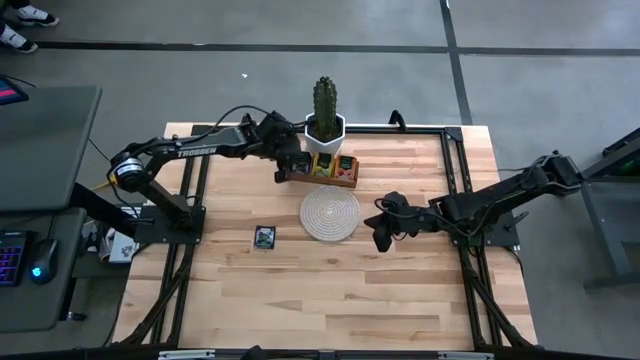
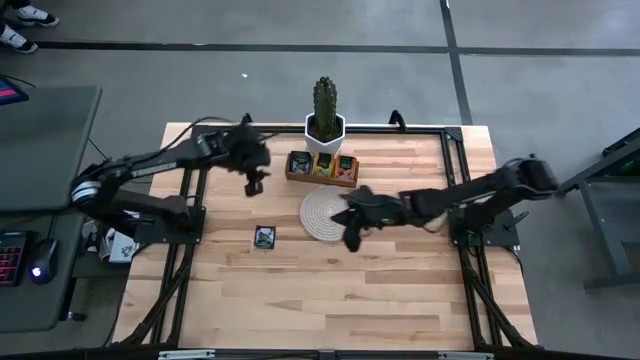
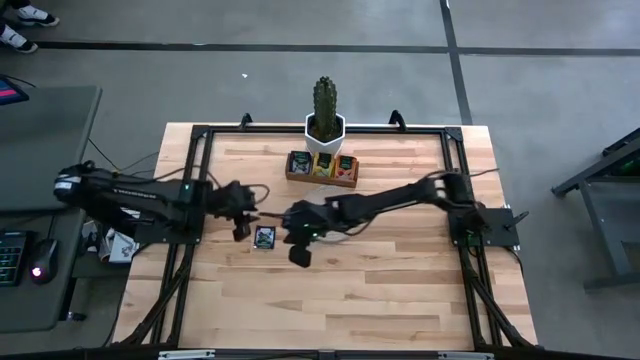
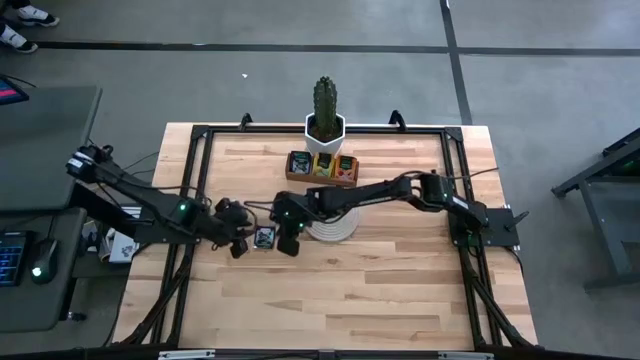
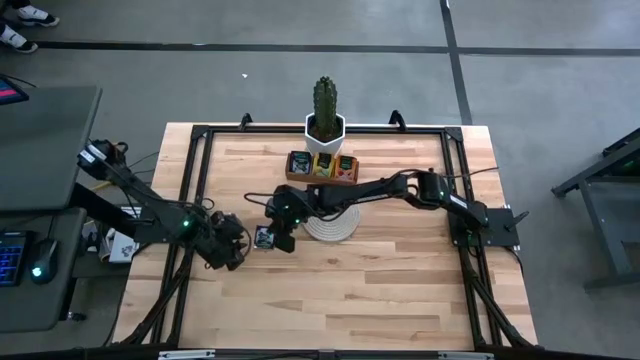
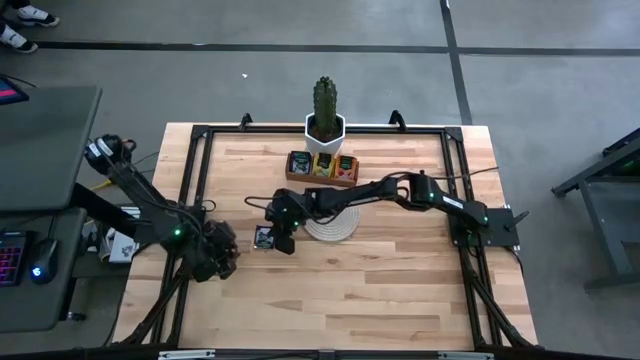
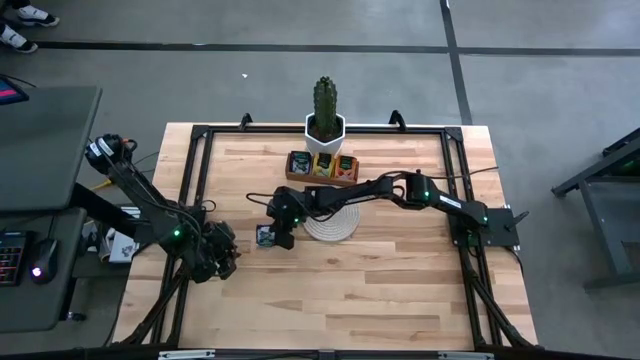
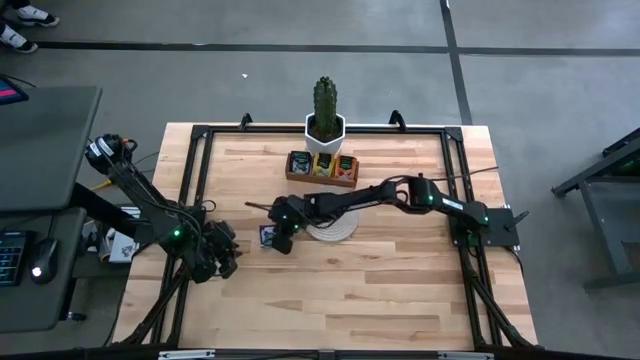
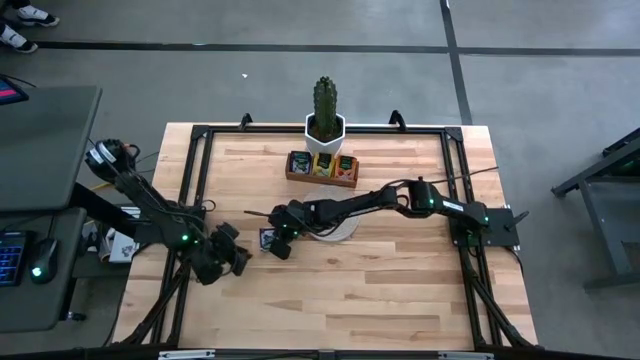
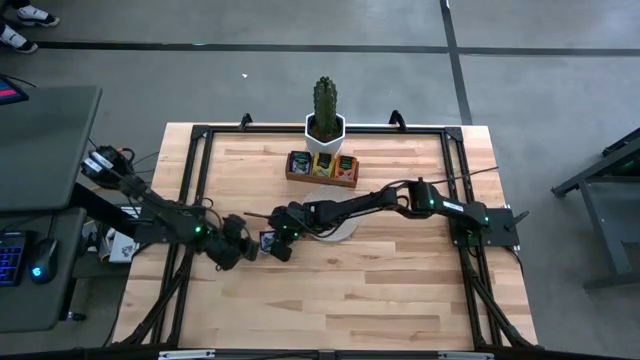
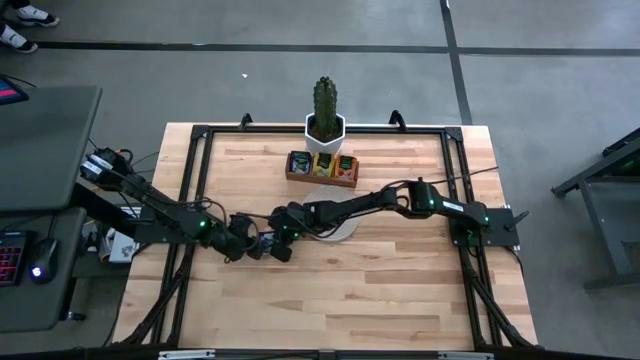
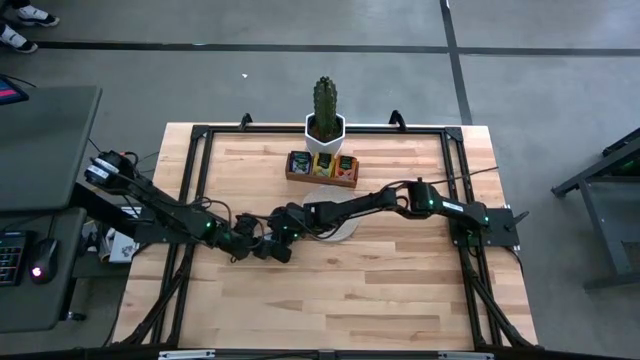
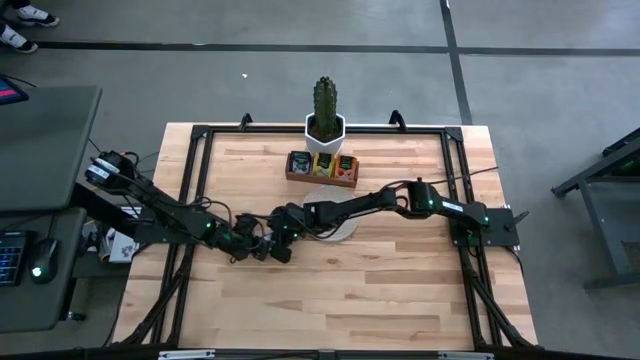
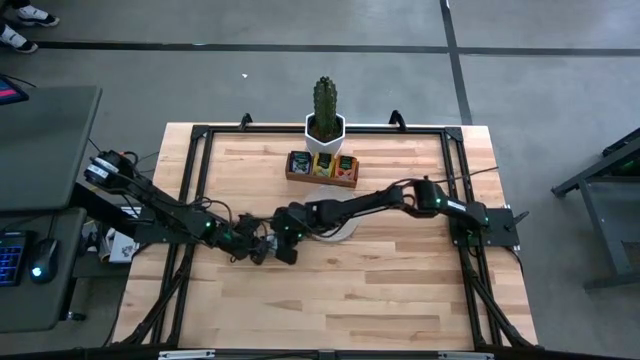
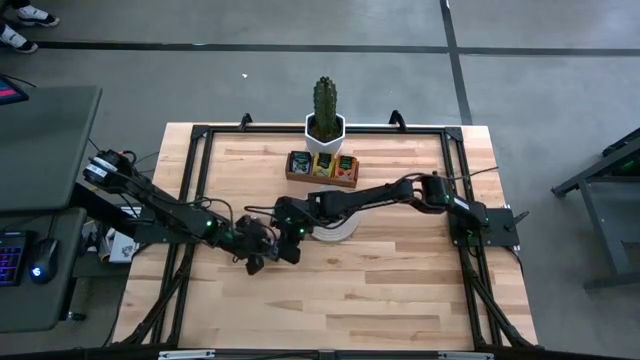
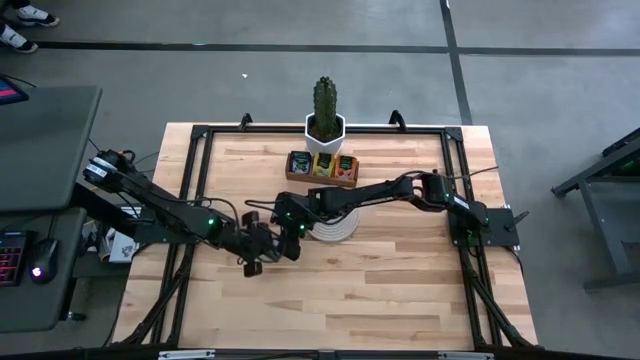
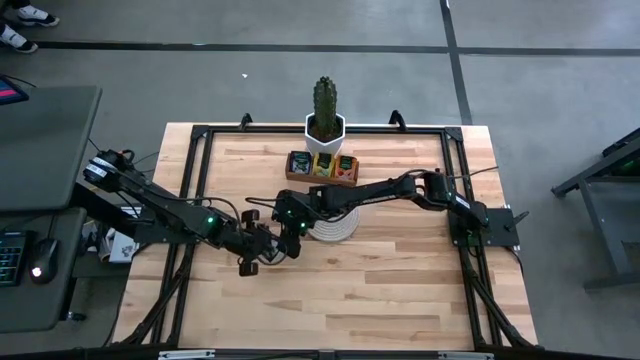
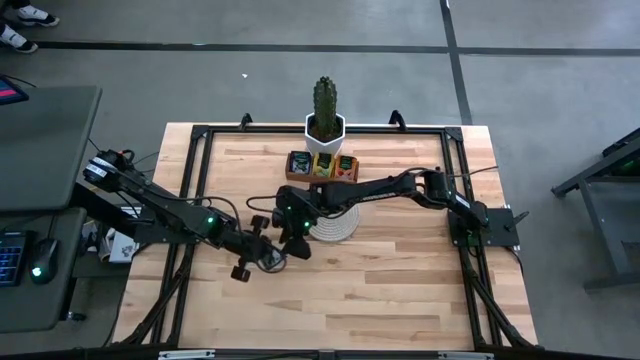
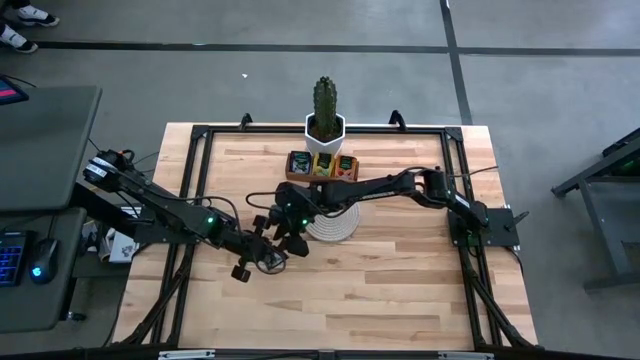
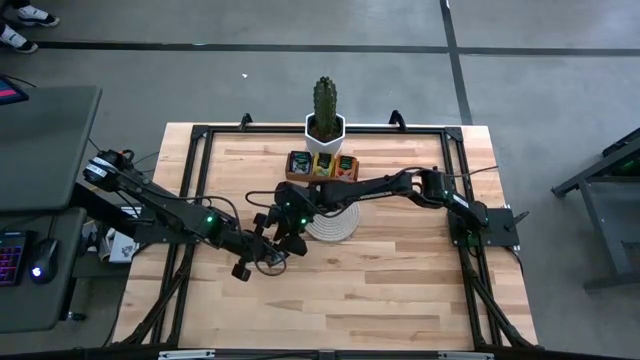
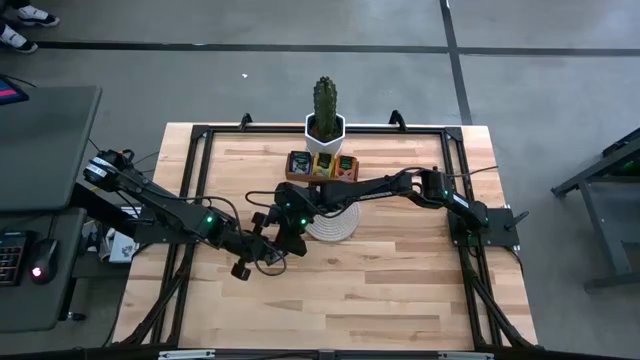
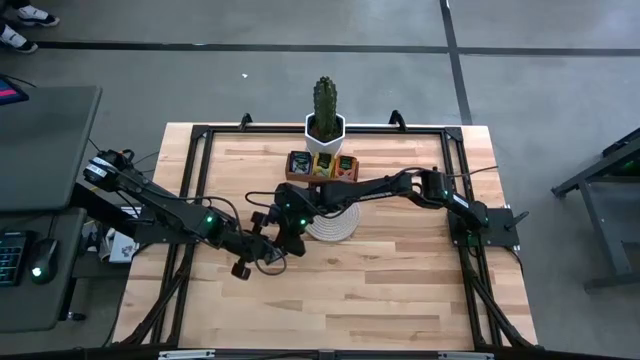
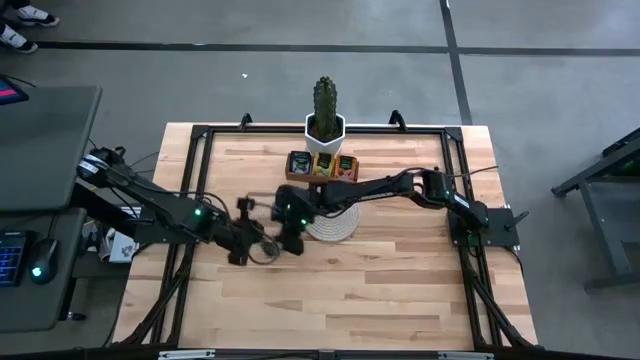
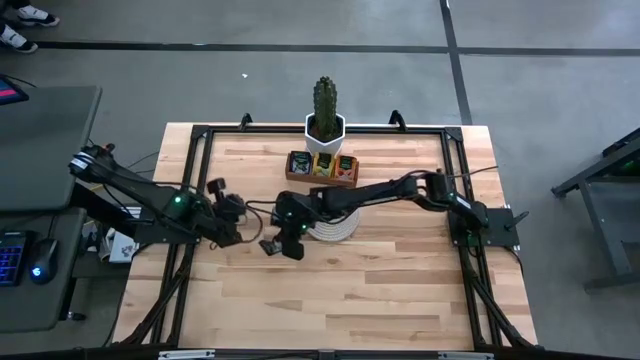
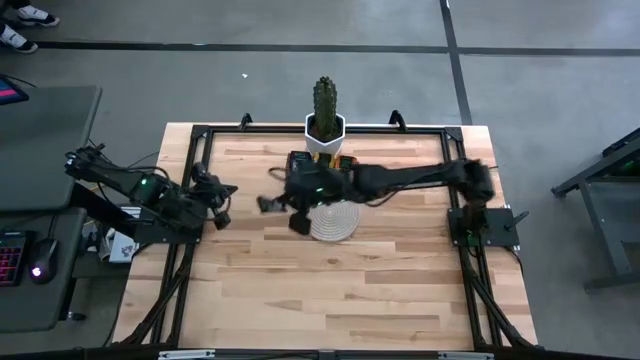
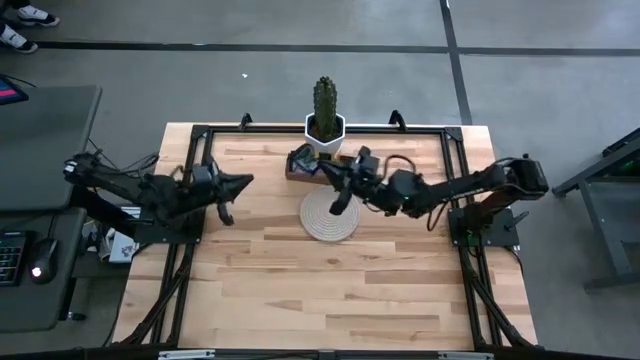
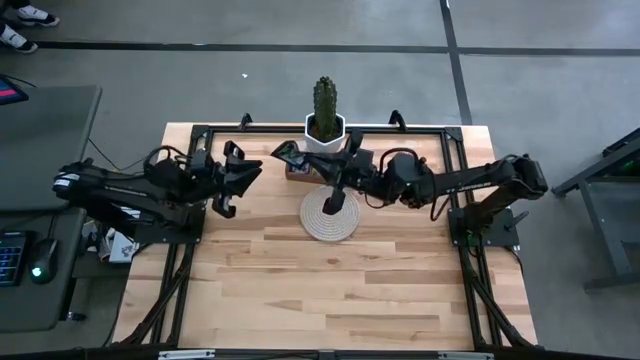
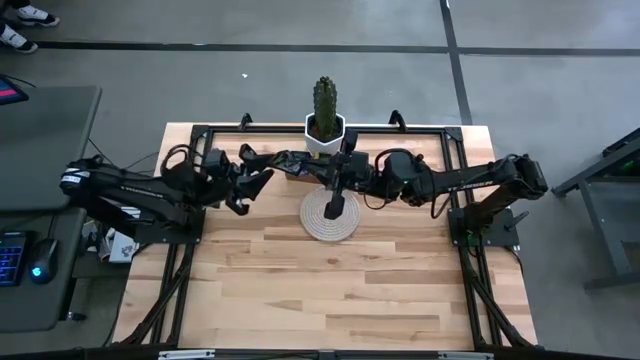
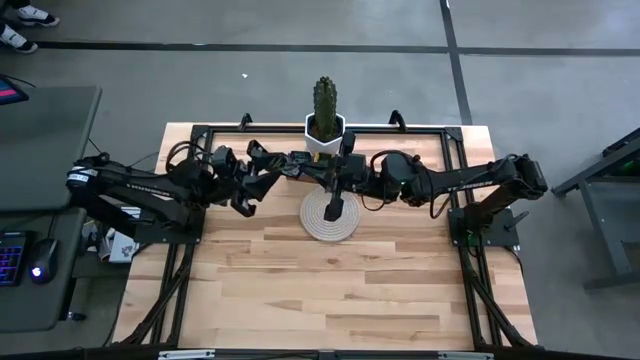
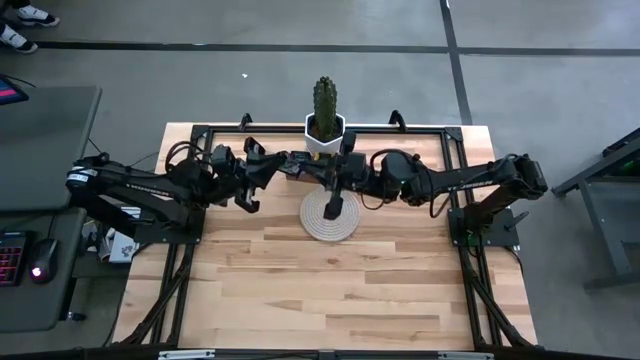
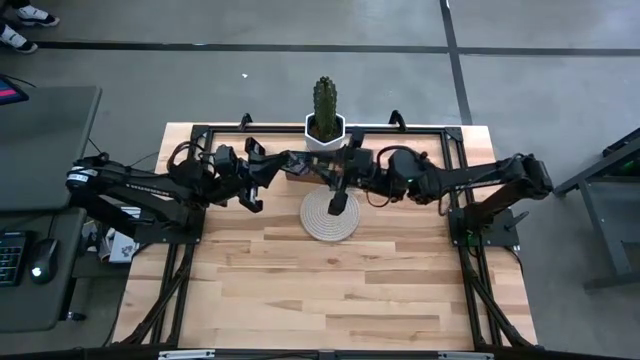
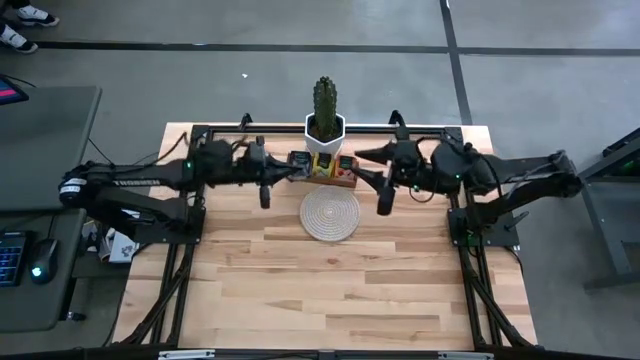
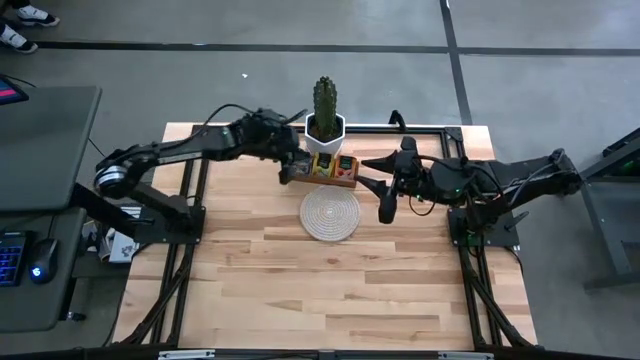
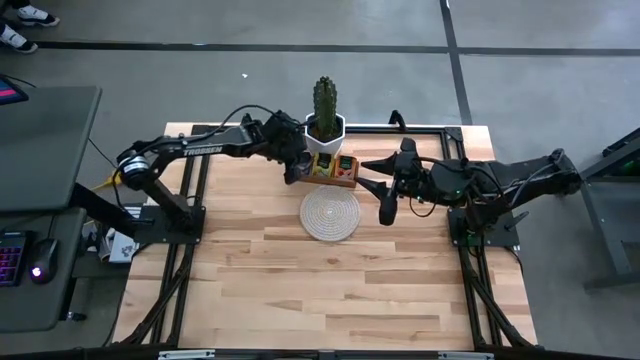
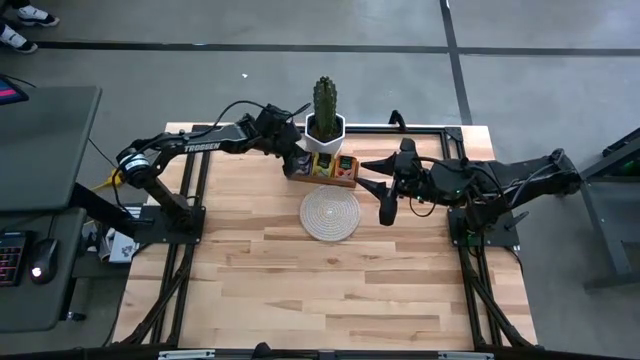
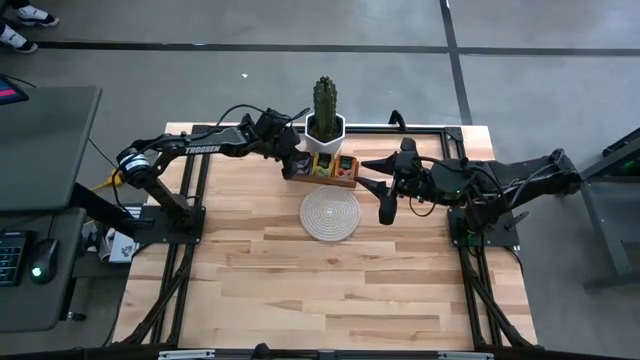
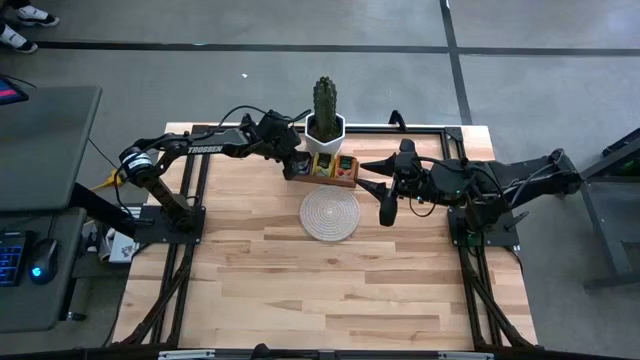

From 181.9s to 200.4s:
Task: Pick & Place Tea
Put the purple tea bag into the left section of the wooden organizer

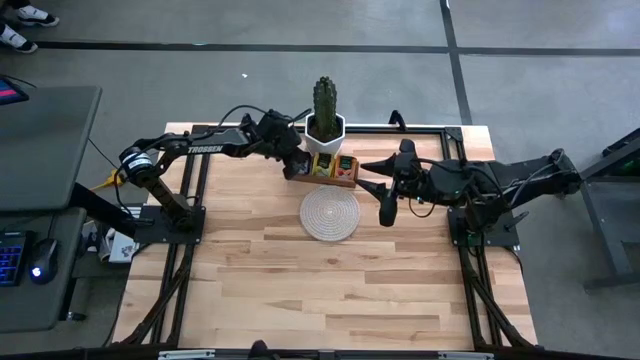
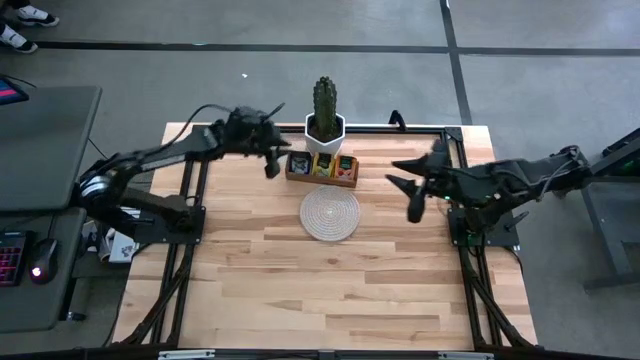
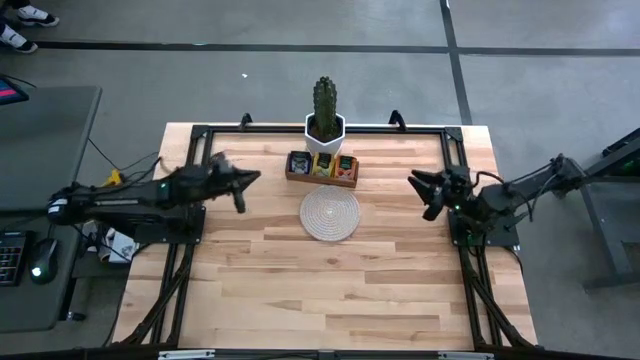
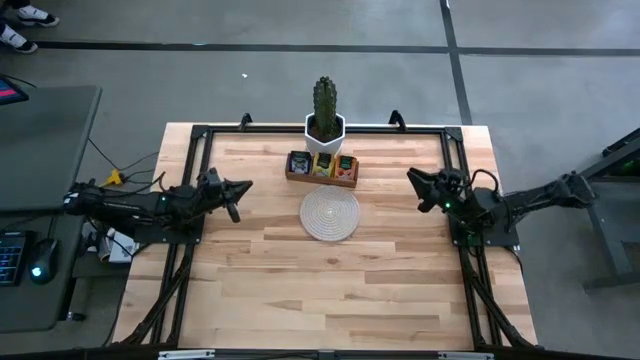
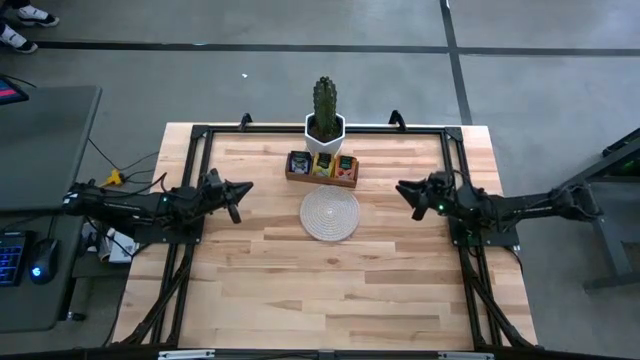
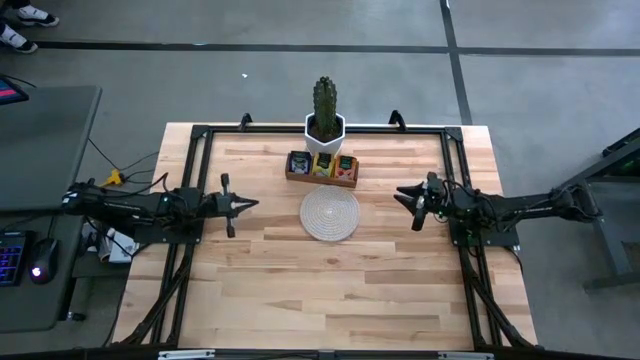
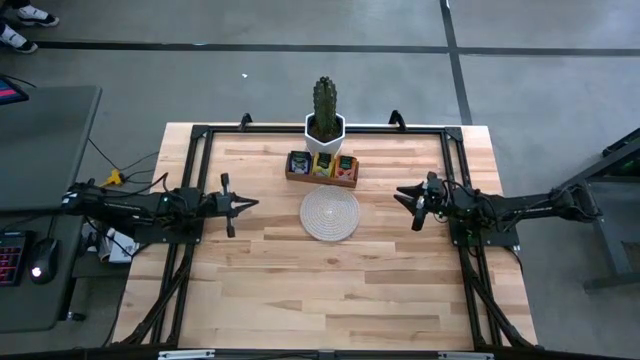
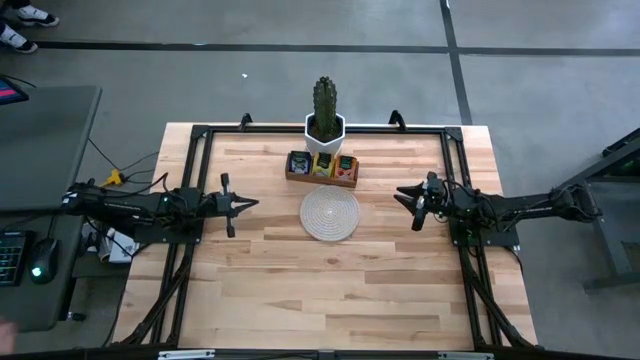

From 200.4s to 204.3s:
Return to Home Position
